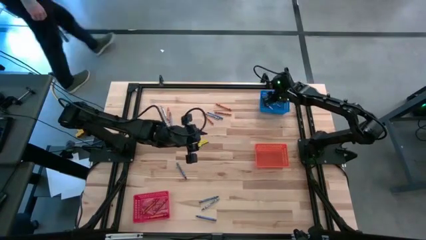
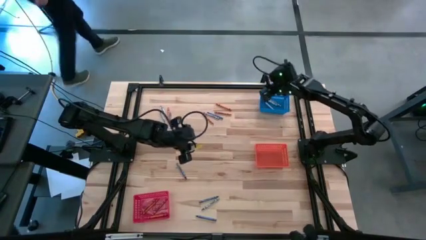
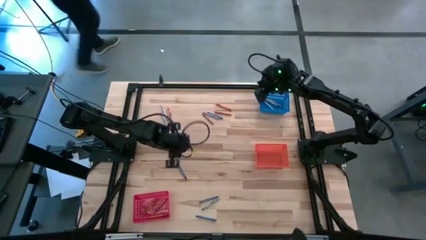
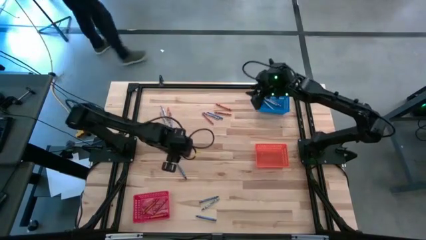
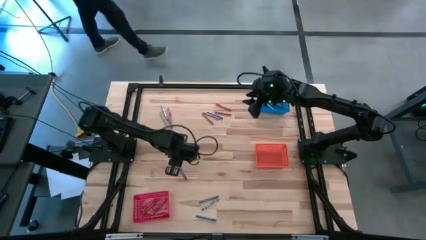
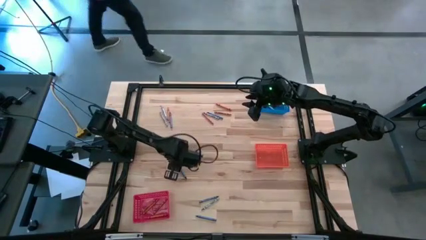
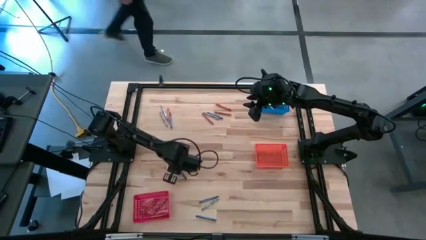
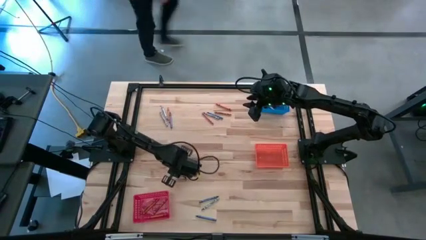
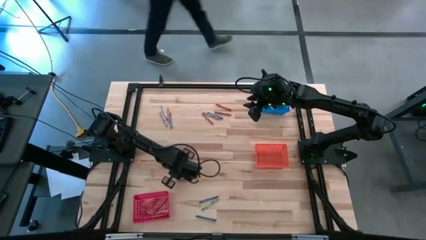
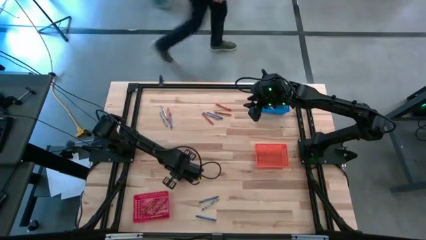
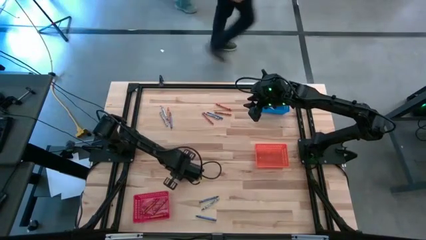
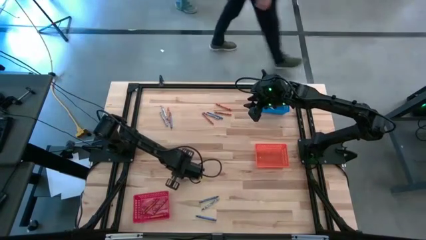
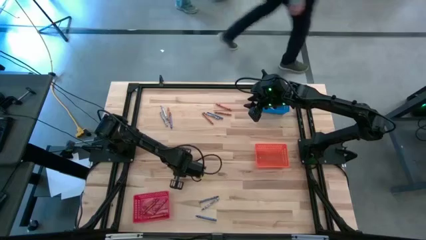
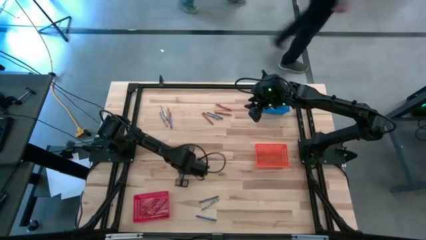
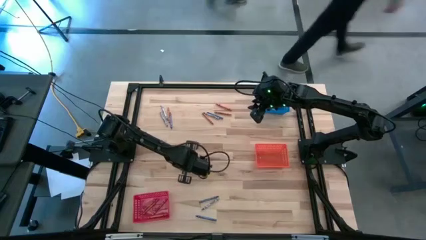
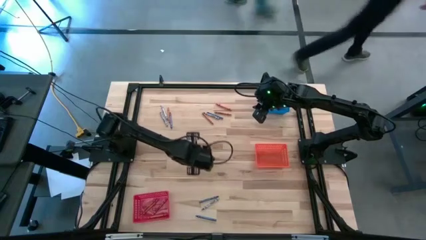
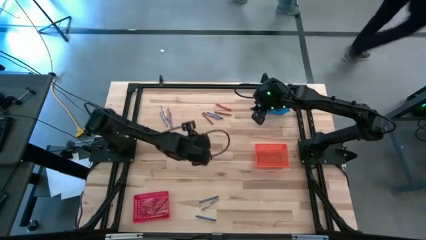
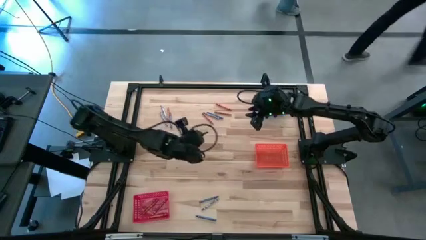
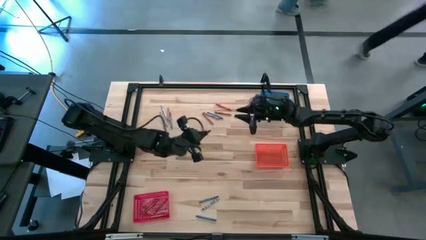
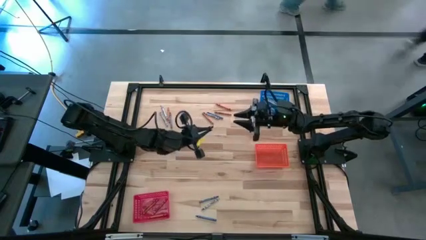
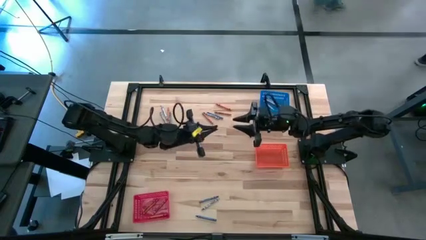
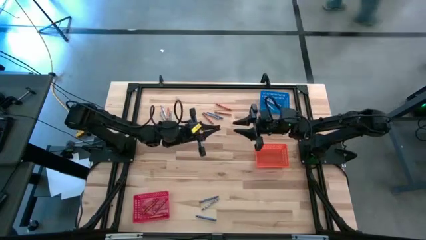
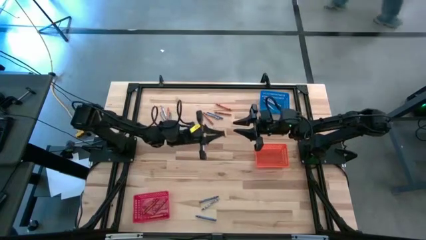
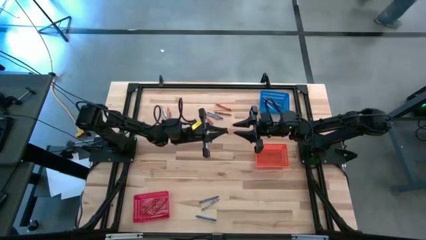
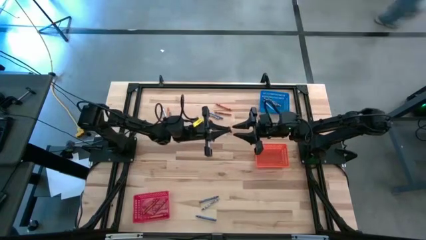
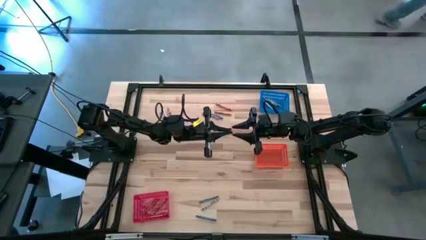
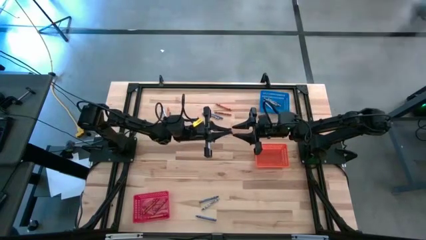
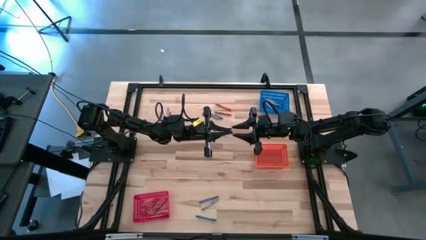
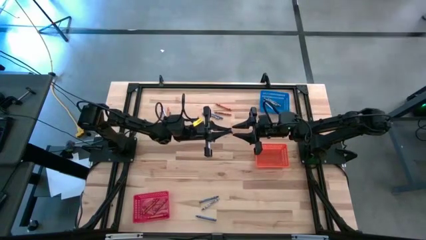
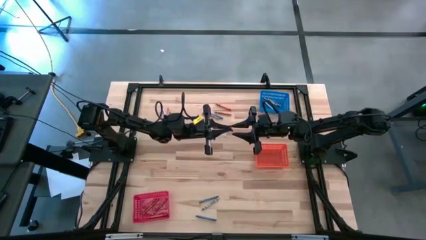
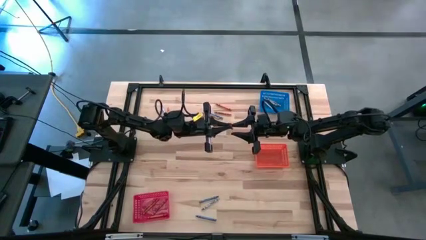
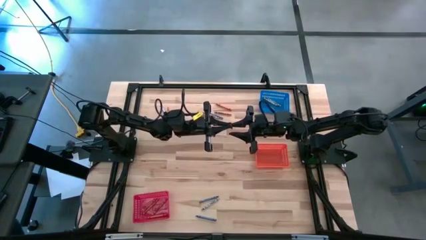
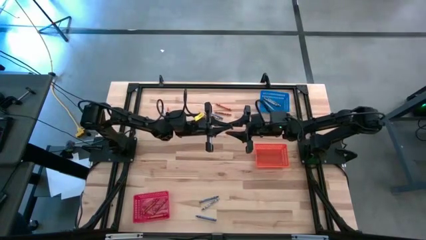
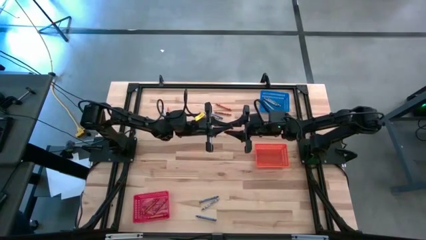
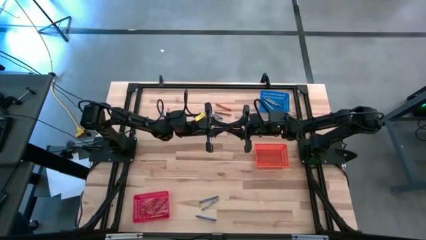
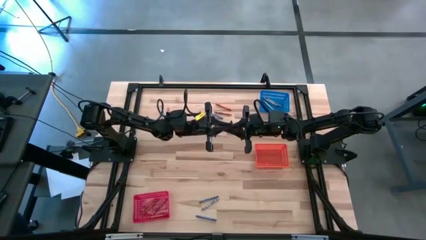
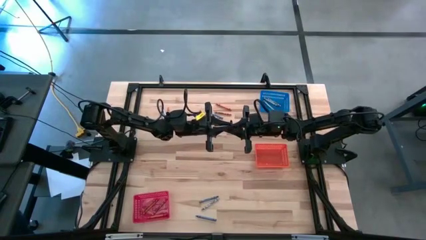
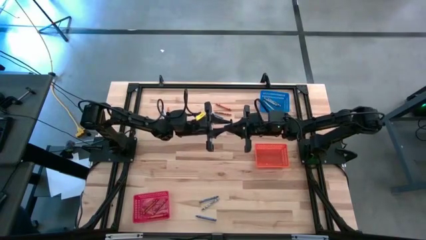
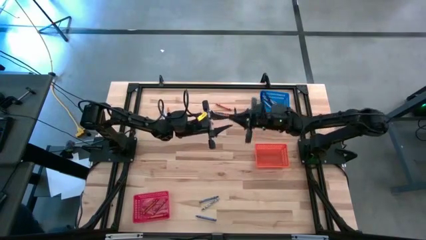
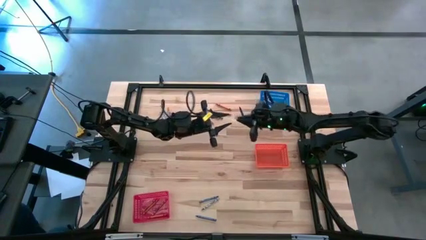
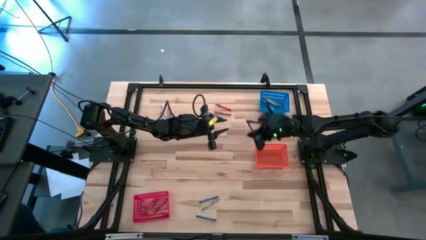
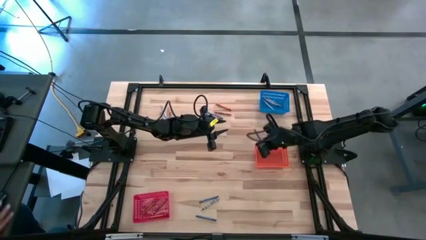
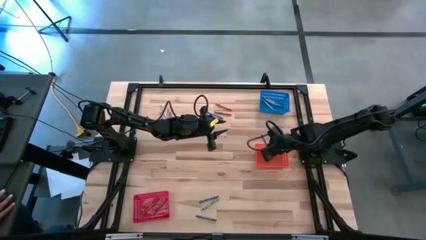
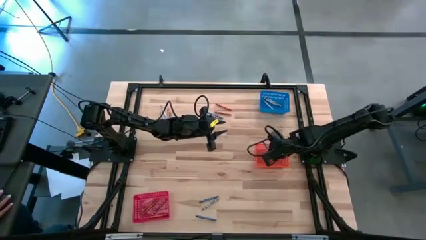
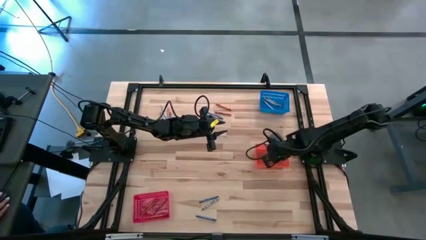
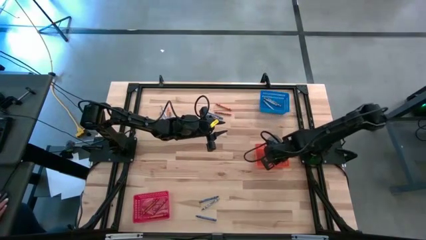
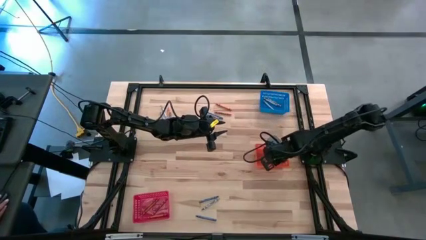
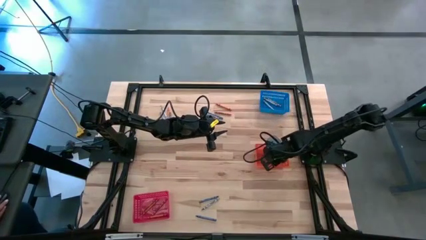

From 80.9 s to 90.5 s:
Task: Sort crayons
Put the blue crayon into the orange bin

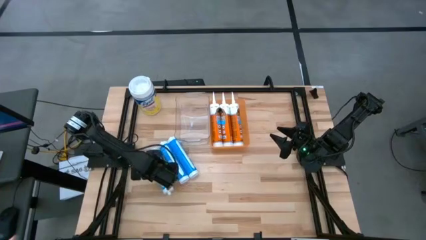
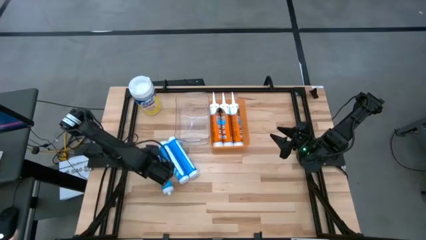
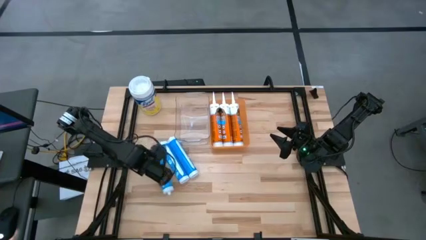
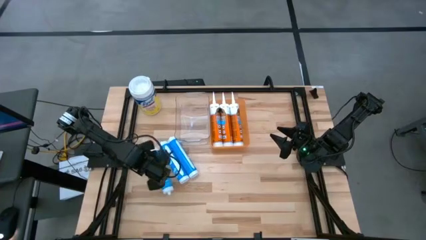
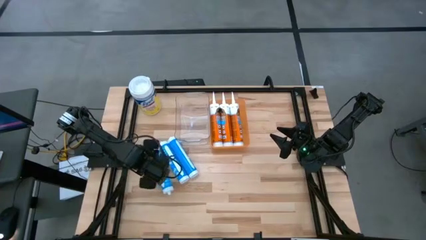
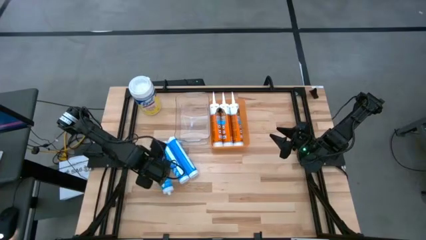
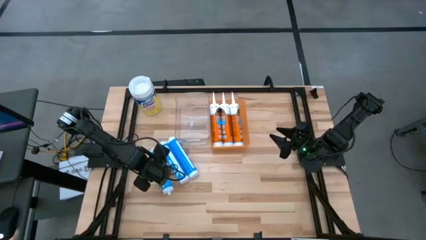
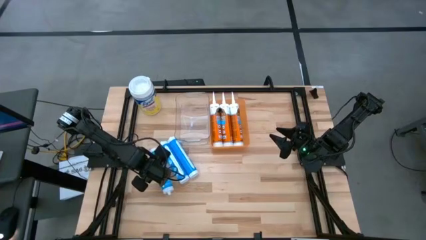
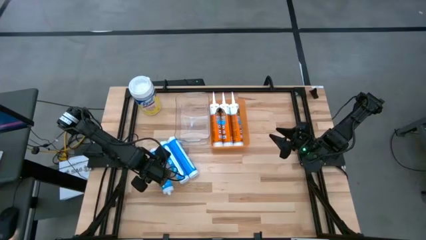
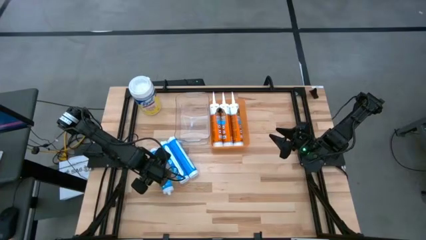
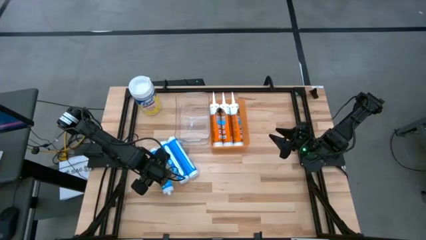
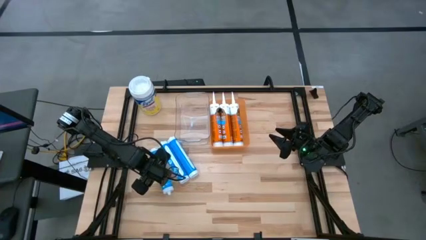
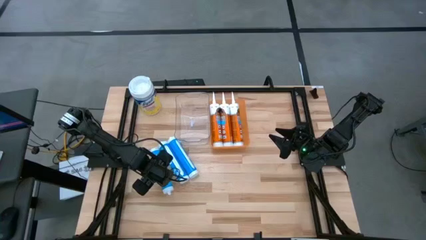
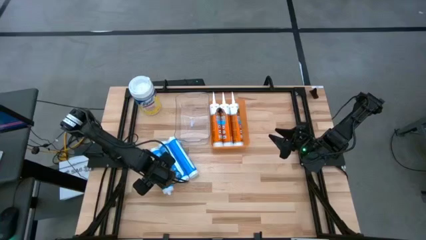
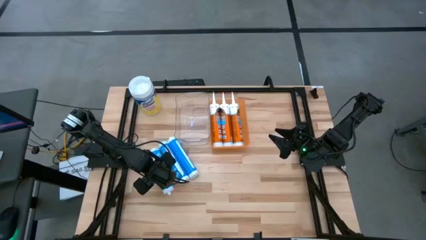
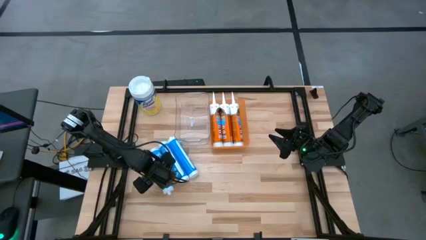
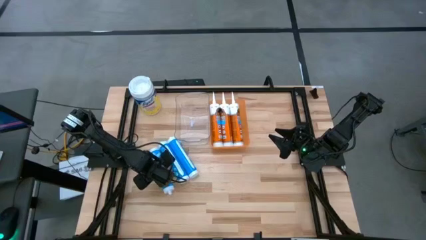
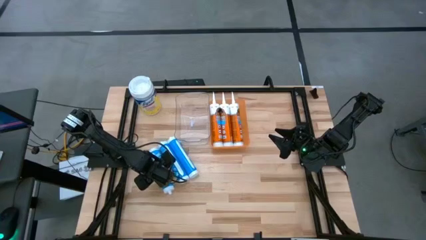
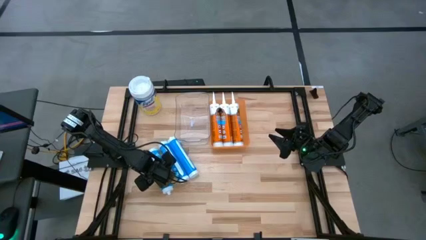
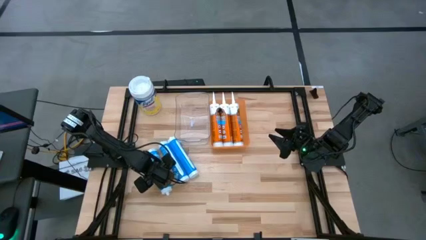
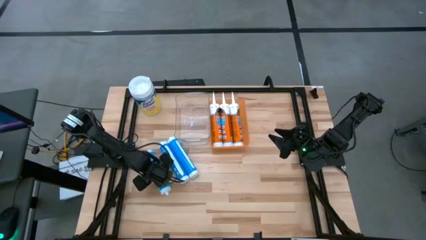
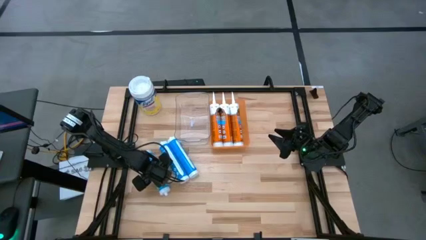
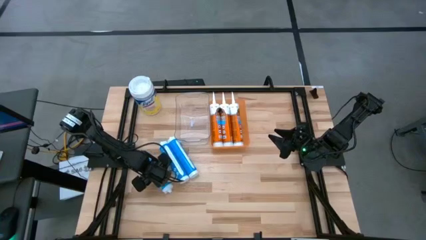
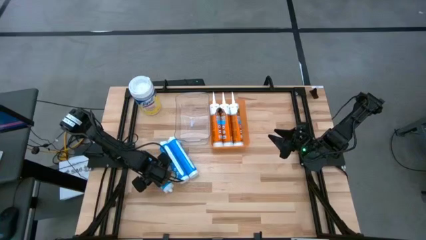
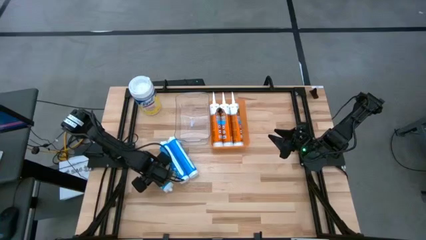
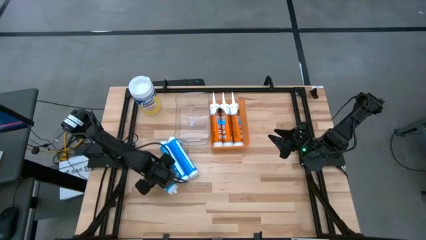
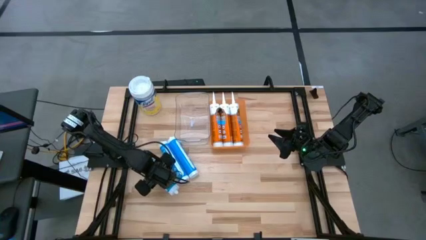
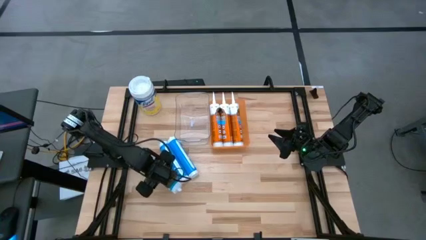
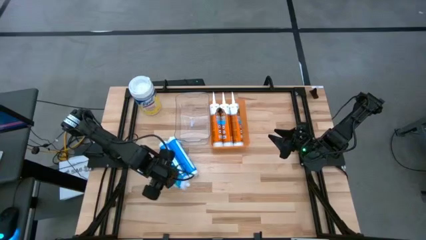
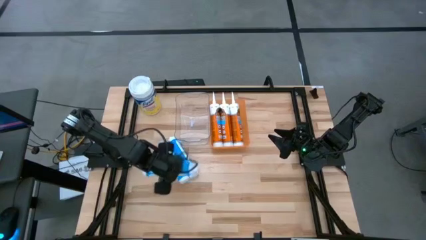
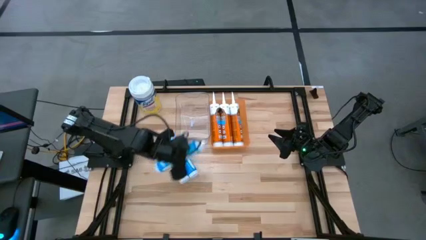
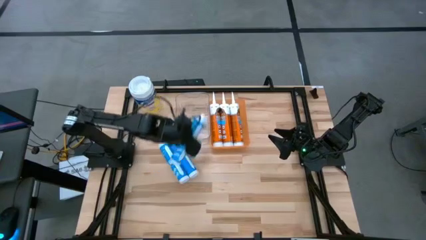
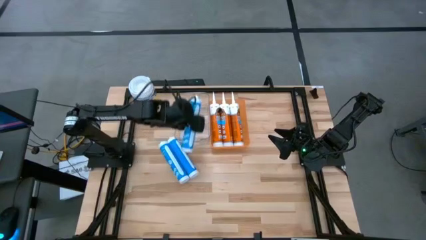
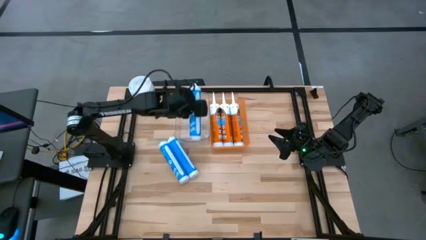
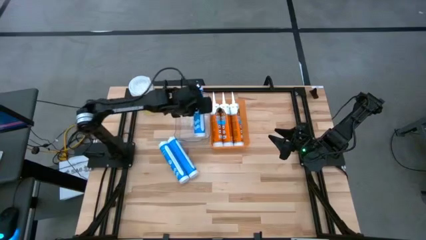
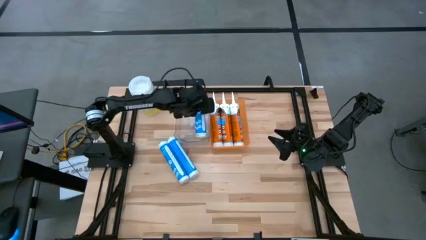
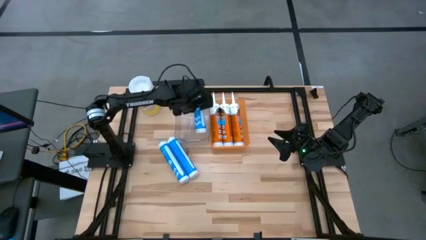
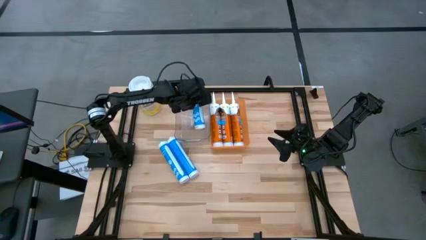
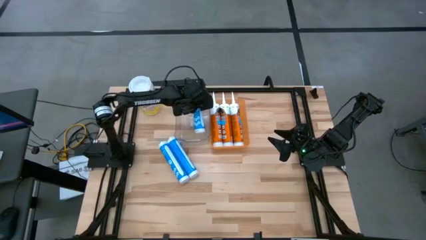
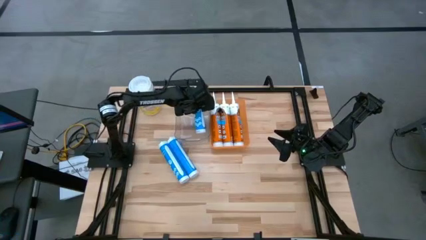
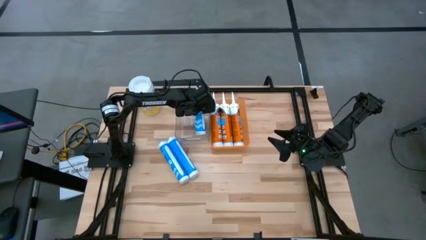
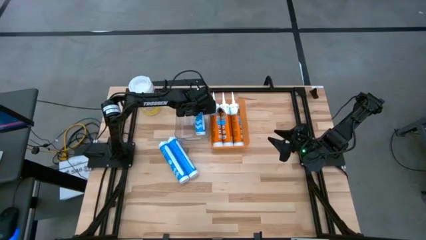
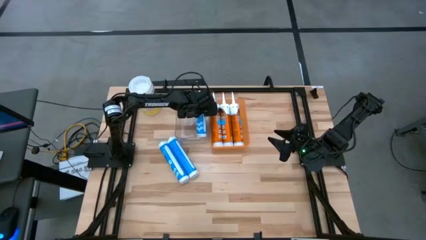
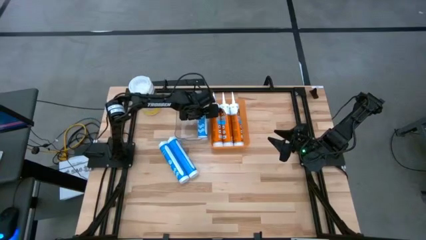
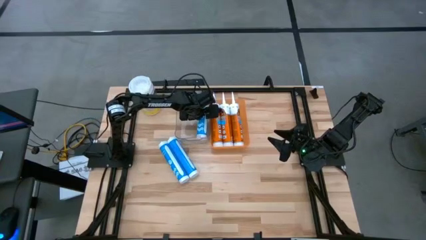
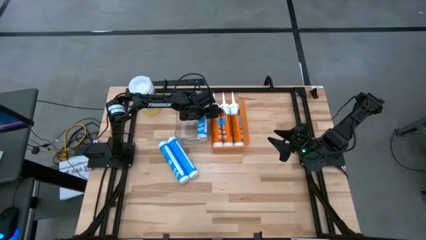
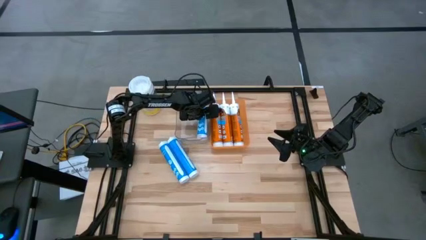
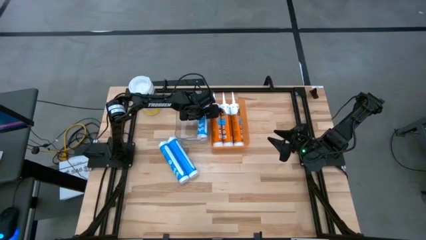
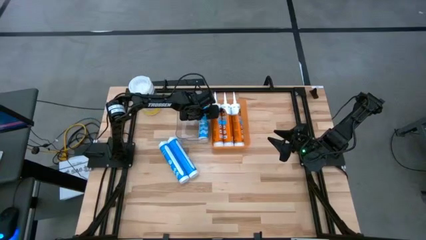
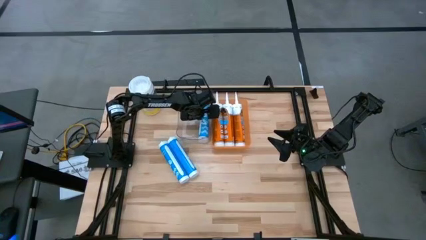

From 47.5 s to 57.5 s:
Task: Pick & place silicon tubes, Sealant and Lysol wipes
Put the bottom blue sealant into the transparent bin
